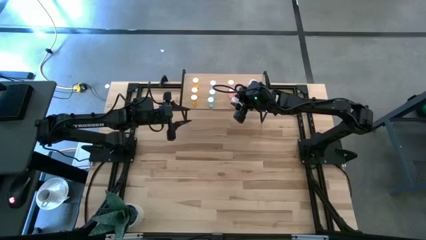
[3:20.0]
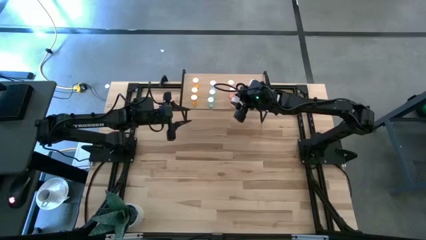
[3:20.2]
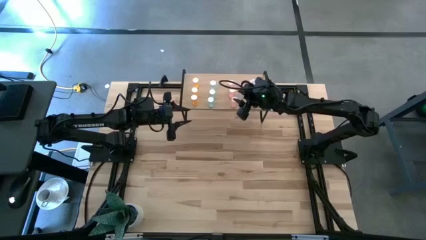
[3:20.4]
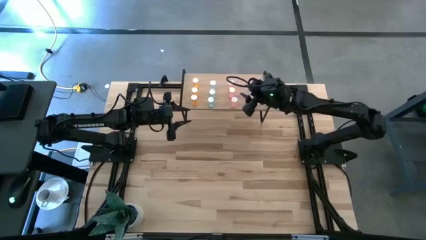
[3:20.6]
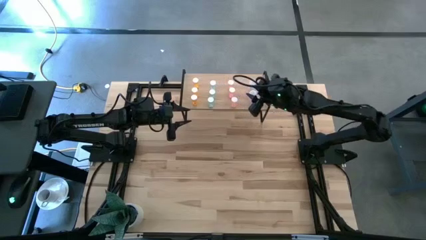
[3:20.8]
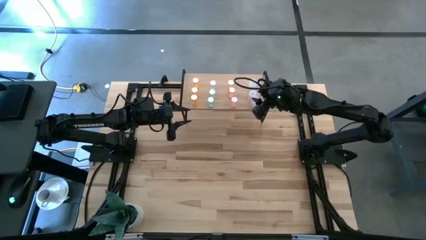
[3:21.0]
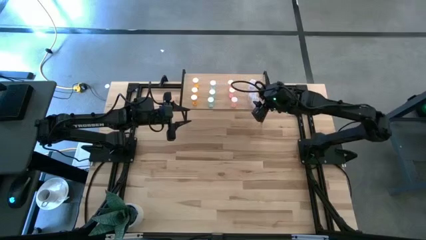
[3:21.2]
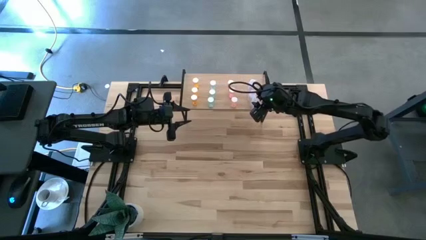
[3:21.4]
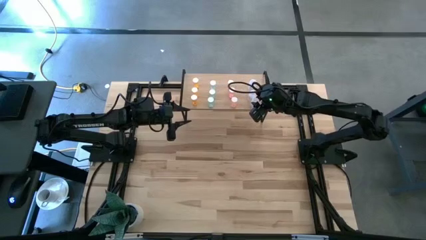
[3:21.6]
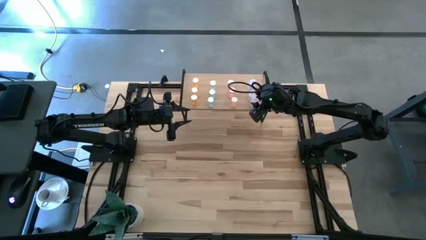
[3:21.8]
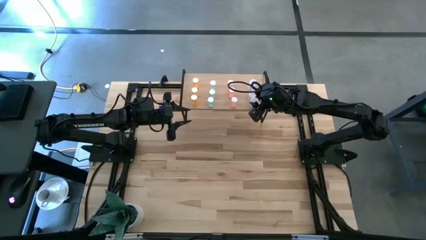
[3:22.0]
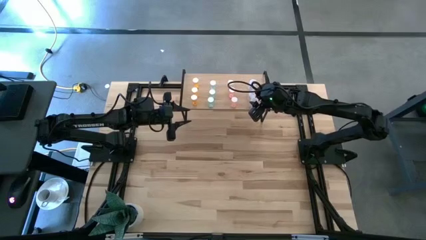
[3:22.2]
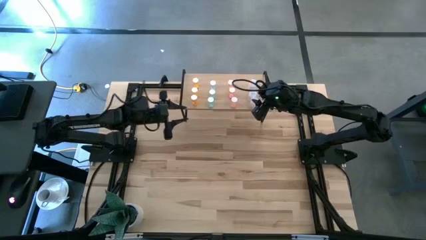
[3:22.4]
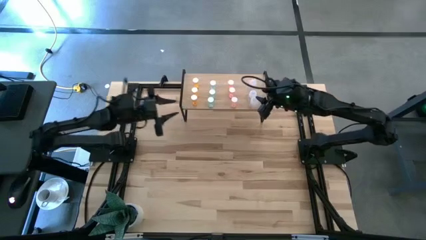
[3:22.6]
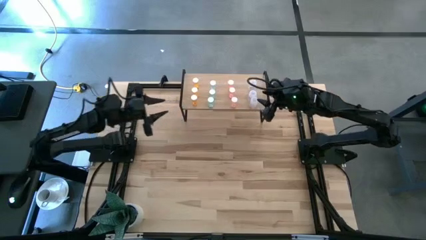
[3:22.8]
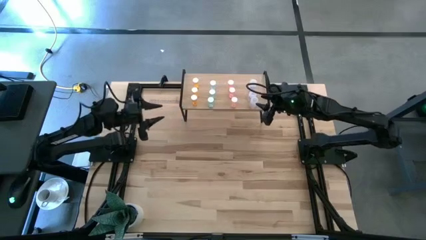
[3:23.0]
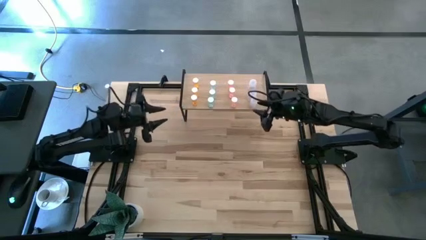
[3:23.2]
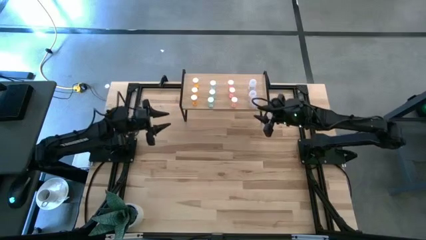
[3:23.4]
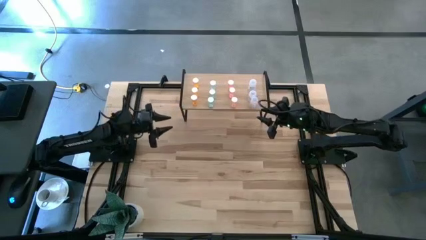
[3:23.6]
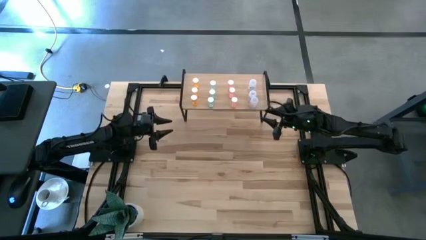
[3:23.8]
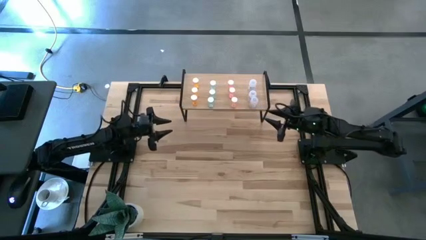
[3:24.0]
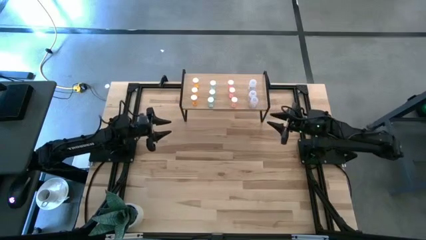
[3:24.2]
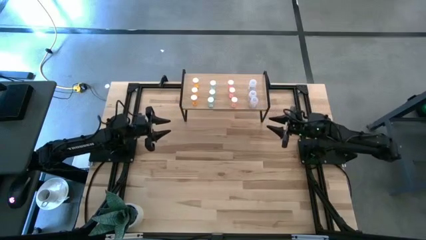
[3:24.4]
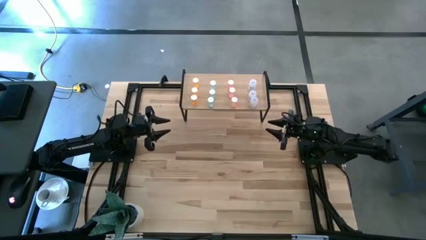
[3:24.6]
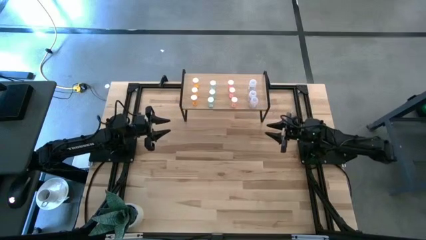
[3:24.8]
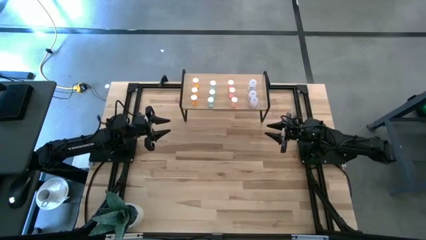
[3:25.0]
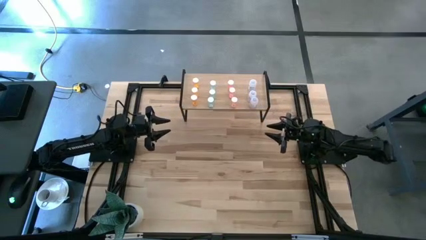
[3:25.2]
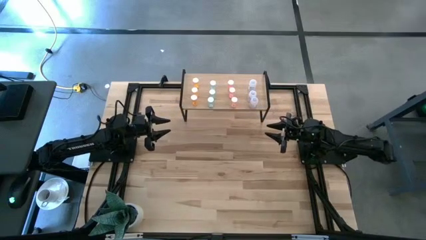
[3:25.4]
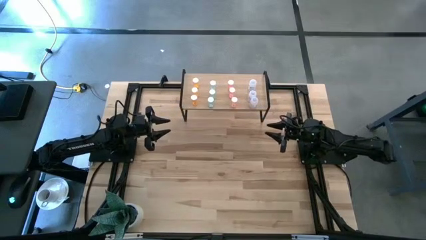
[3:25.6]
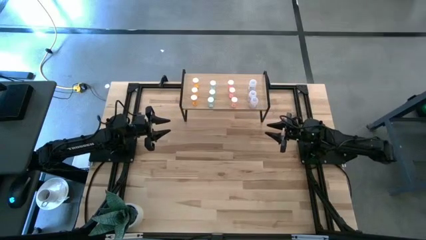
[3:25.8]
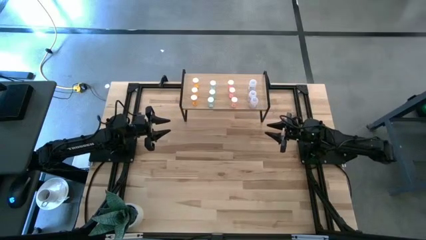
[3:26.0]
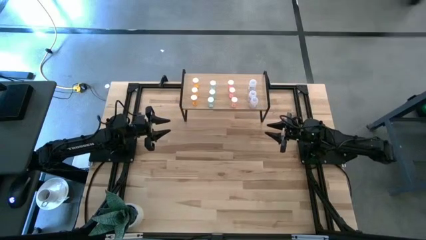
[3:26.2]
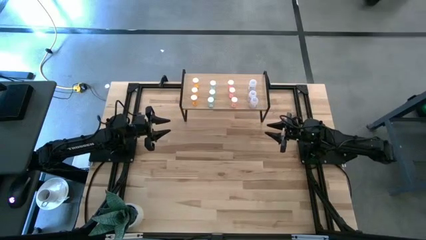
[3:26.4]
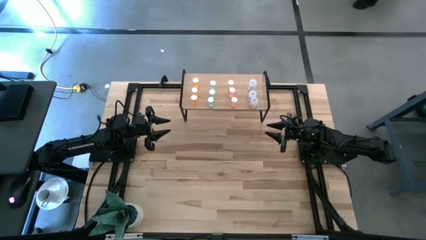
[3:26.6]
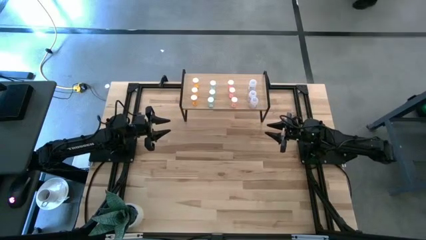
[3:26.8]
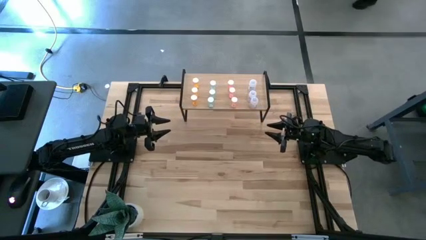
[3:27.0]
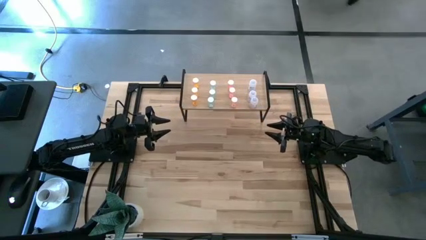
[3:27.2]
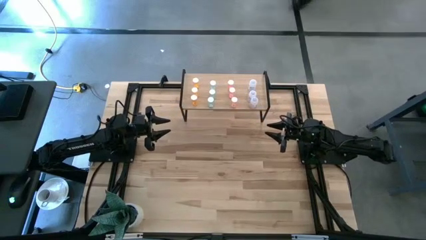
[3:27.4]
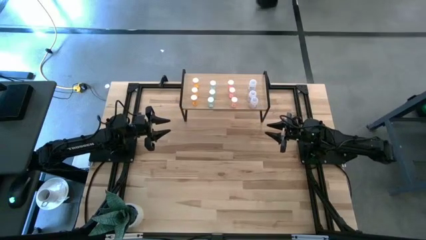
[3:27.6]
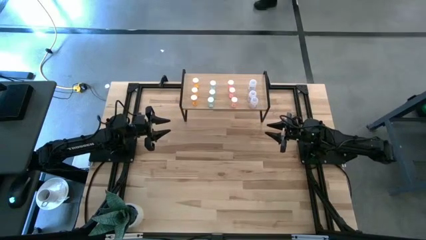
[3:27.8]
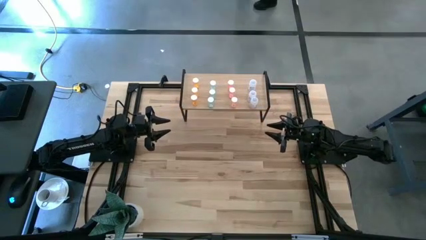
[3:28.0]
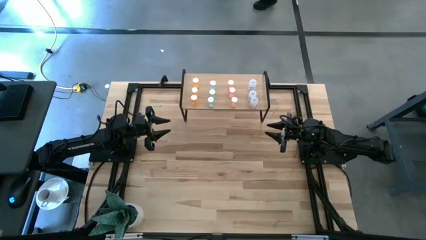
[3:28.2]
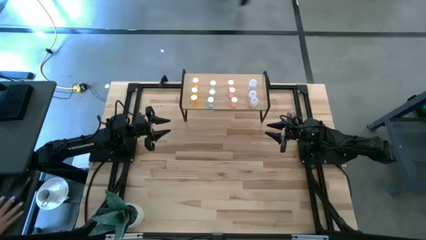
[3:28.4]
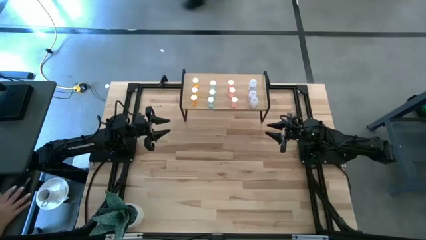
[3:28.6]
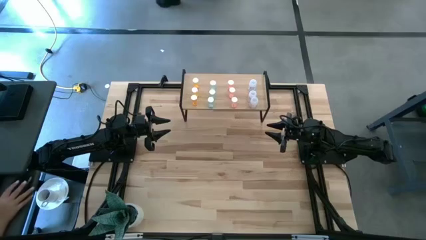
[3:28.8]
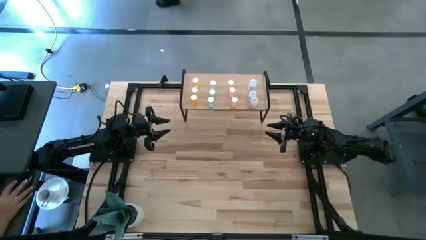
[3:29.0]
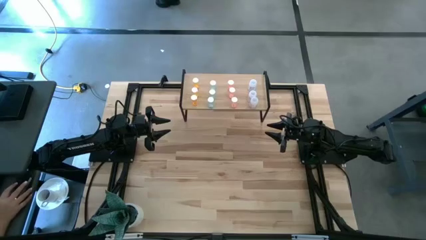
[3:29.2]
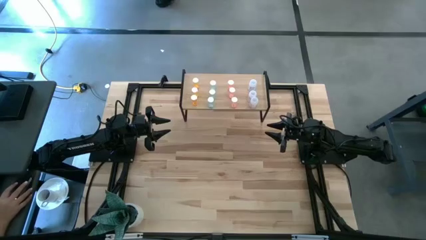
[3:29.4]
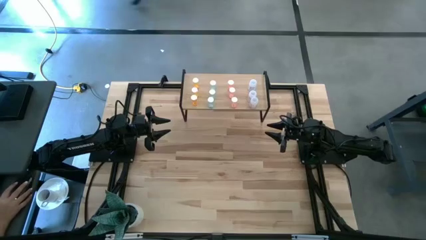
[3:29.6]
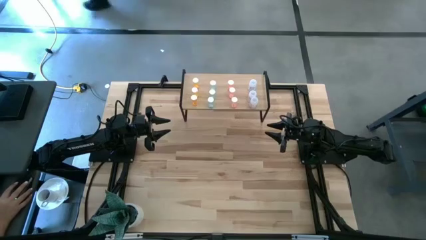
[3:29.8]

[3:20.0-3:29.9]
Task: Pick and place medicine bottles onto shelf by color
Return to Home Position

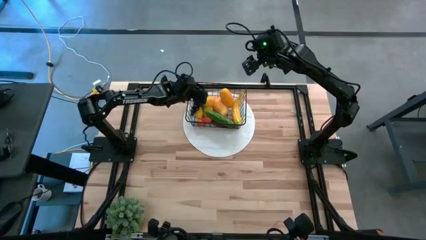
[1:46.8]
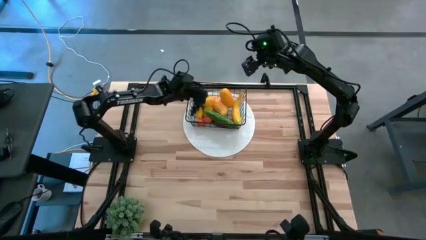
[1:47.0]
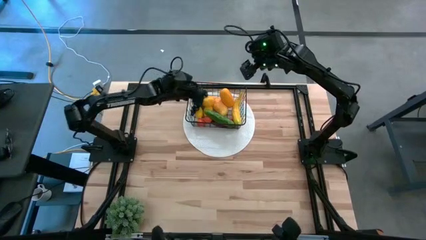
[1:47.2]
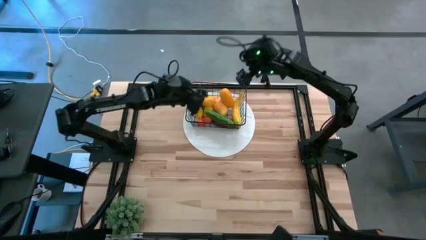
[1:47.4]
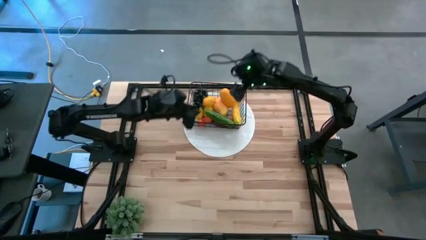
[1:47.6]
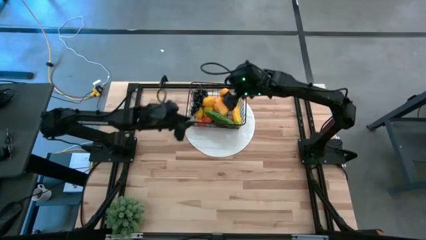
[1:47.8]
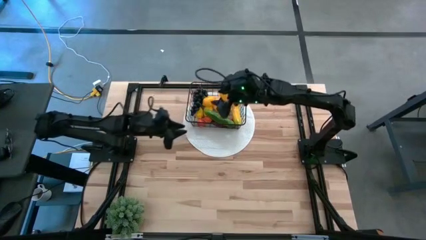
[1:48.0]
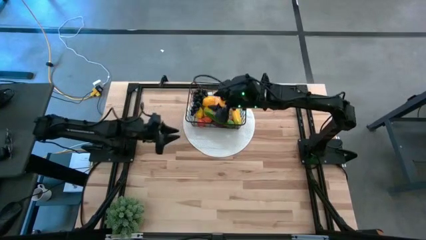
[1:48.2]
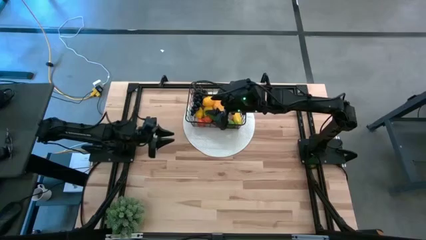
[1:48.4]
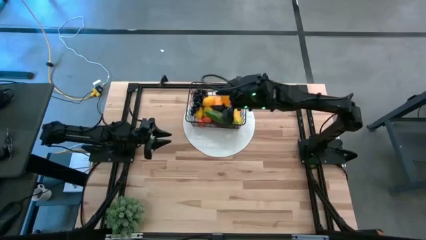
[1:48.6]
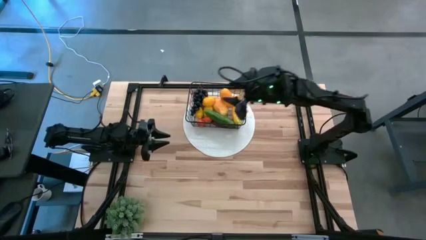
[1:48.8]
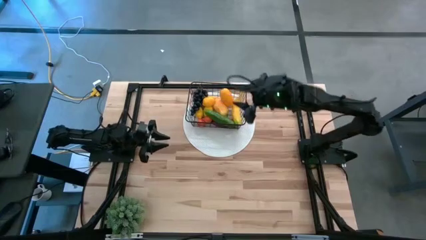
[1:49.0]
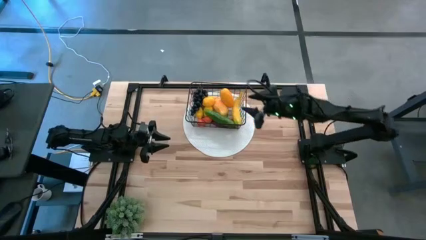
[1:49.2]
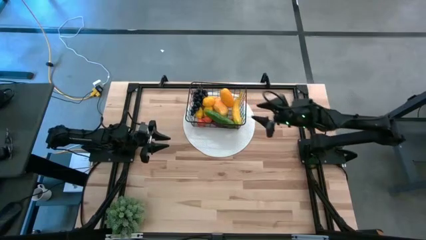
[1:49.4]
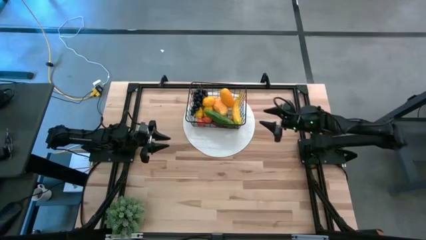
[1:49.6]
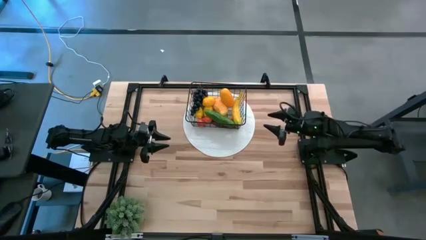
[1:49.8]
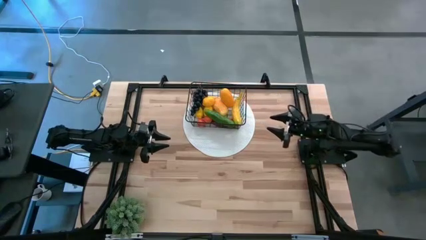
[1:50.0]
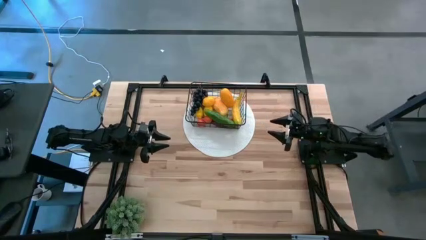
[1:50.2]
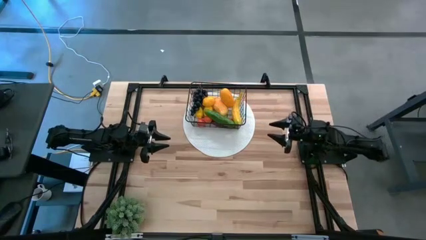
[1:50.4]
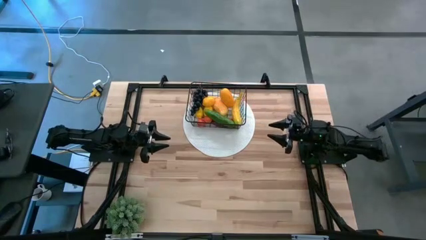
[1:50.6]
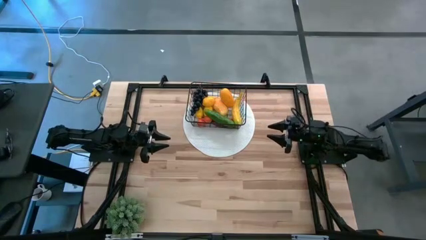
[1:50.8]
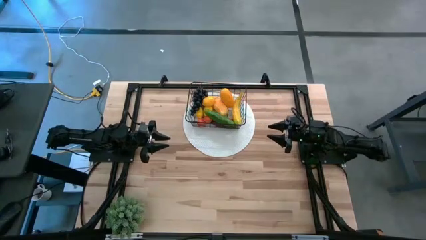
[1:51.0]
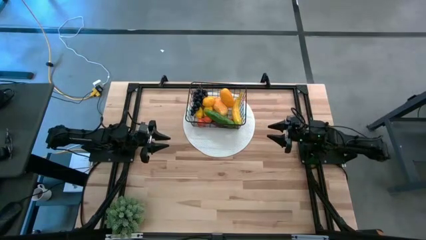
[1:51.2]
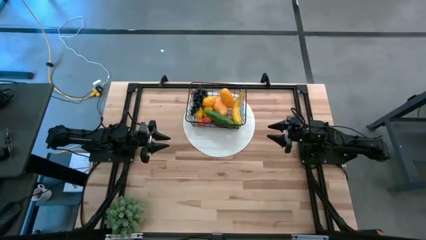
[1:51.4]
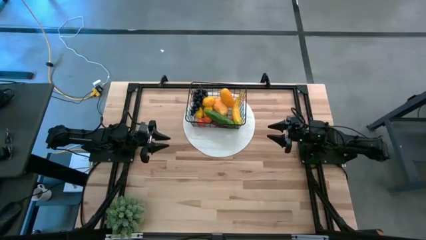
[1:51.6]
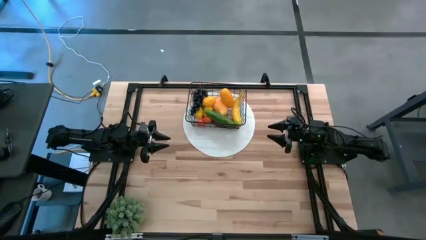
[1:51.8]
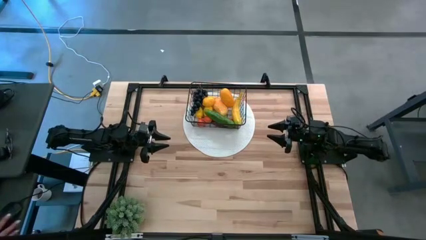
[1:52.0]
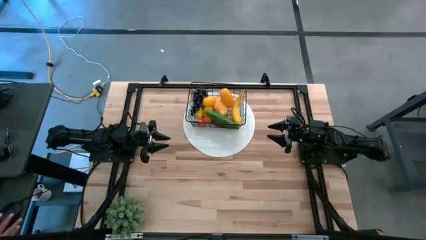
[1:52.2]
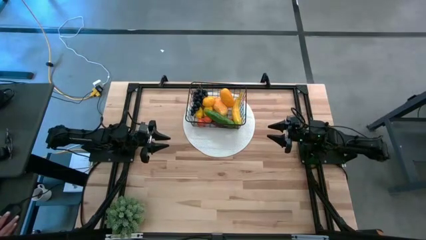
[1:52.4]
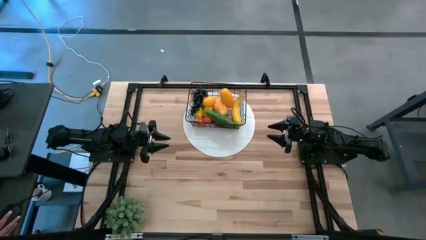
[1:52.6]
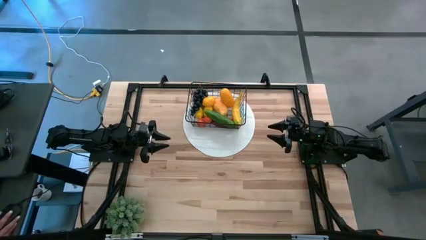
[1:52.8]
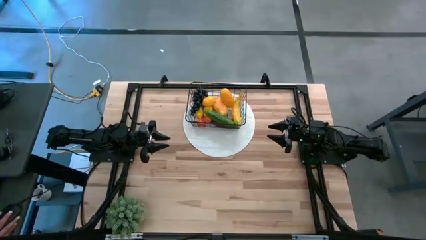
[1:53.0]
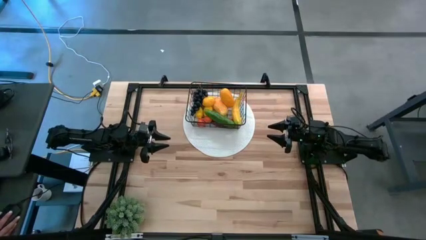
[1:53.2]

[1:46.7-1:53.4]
Task: Build produce basket
Return to Home Position
